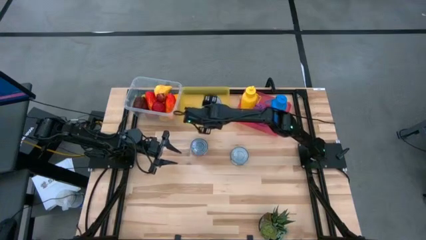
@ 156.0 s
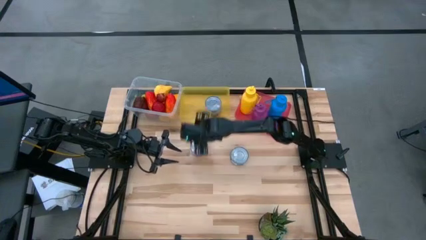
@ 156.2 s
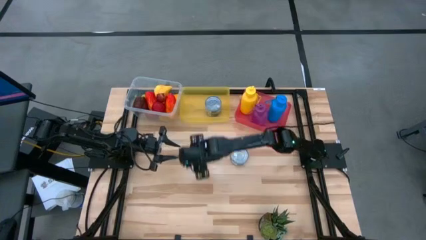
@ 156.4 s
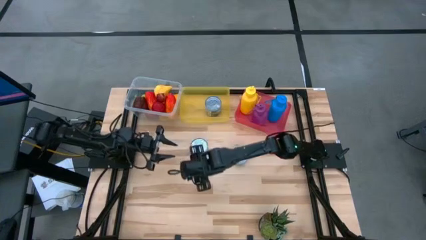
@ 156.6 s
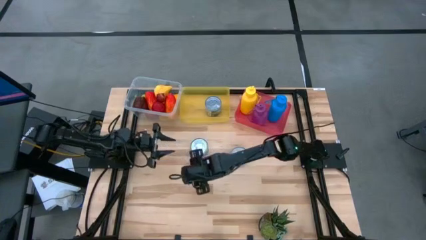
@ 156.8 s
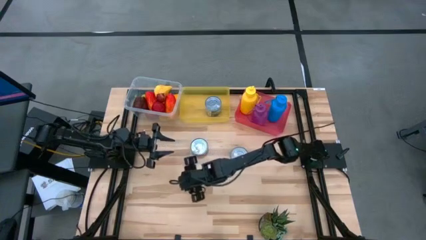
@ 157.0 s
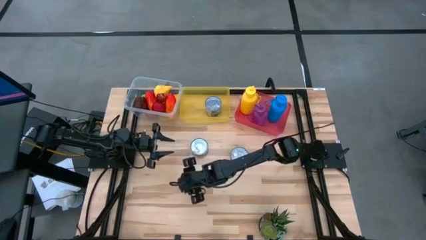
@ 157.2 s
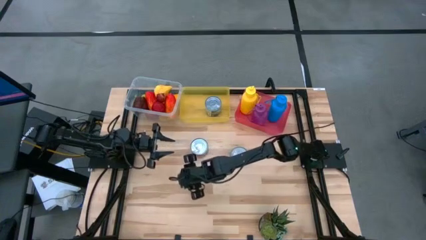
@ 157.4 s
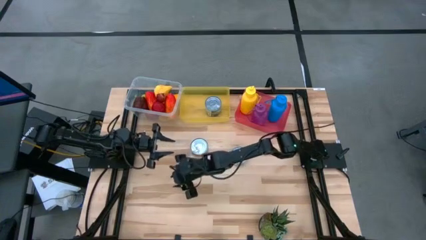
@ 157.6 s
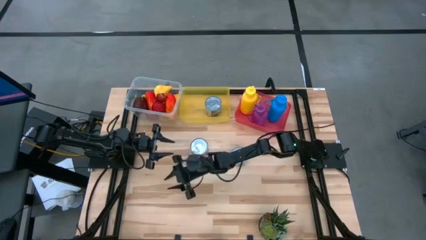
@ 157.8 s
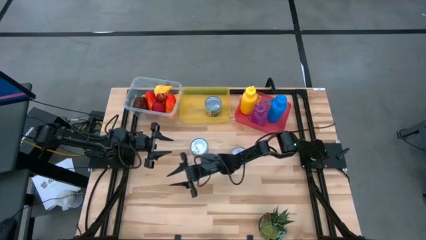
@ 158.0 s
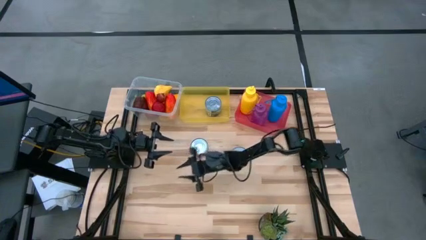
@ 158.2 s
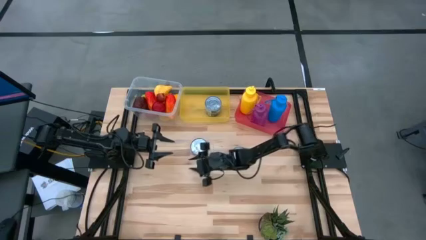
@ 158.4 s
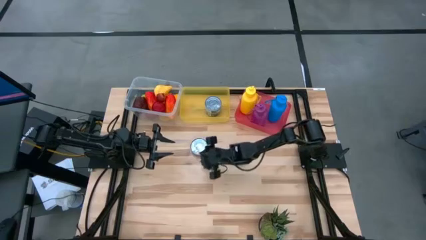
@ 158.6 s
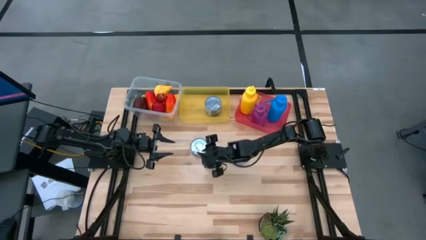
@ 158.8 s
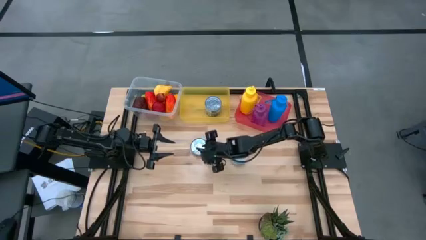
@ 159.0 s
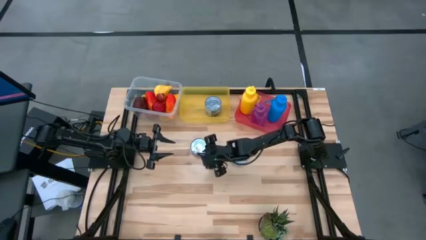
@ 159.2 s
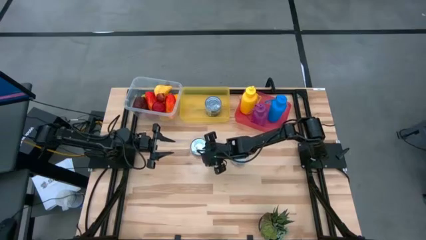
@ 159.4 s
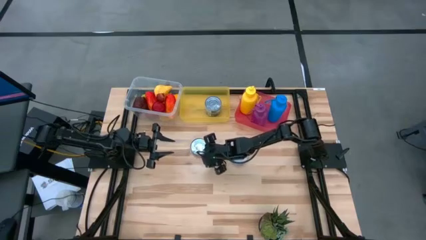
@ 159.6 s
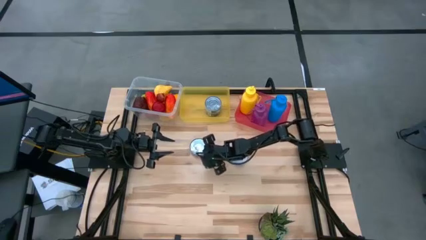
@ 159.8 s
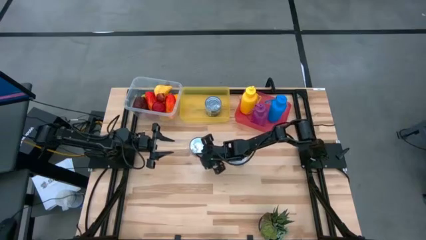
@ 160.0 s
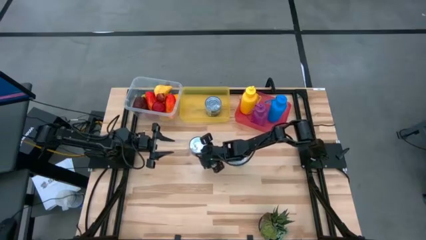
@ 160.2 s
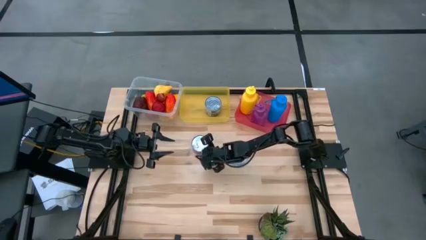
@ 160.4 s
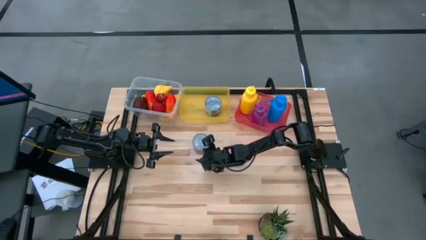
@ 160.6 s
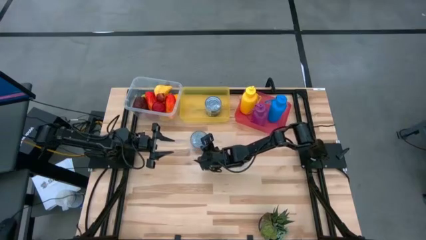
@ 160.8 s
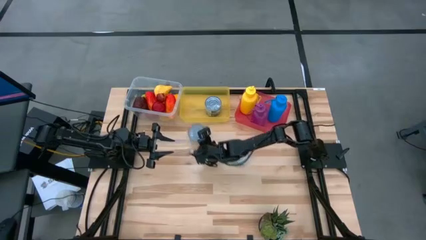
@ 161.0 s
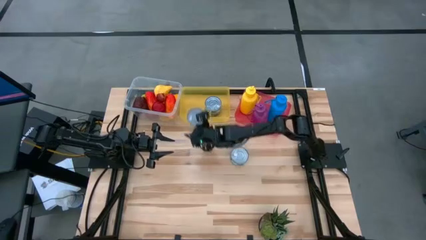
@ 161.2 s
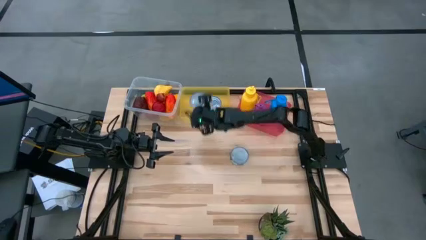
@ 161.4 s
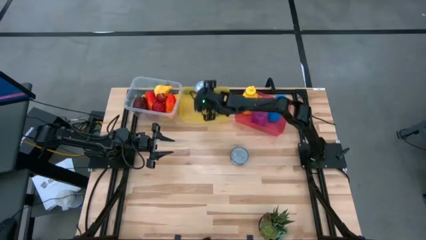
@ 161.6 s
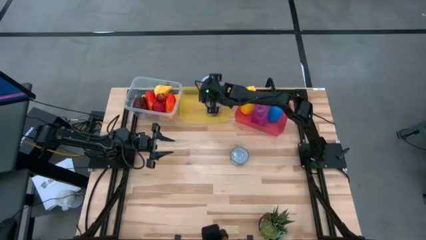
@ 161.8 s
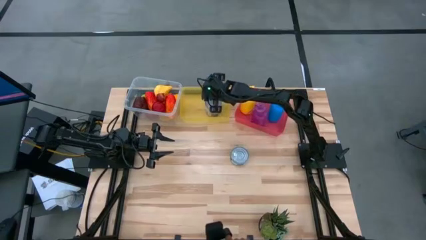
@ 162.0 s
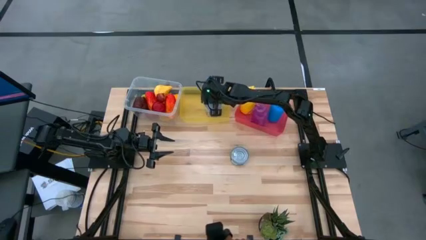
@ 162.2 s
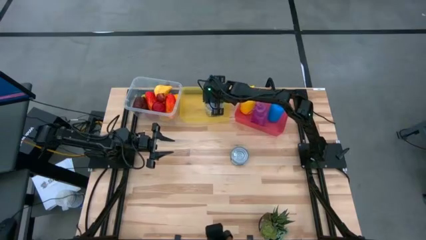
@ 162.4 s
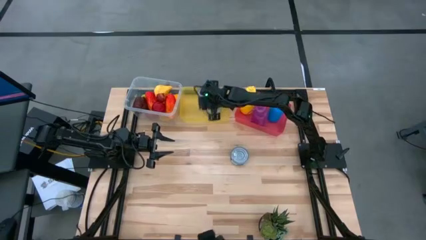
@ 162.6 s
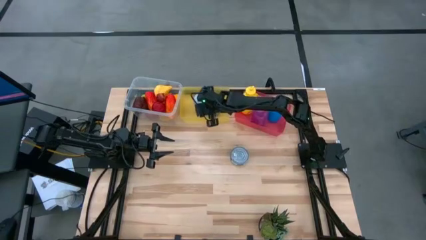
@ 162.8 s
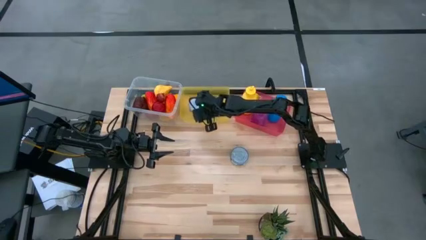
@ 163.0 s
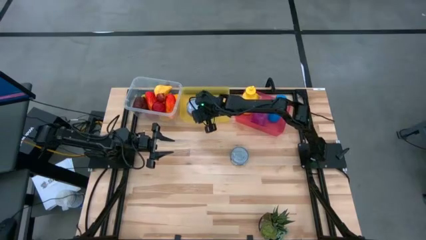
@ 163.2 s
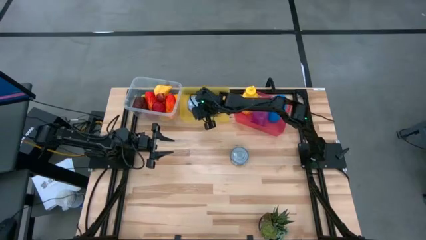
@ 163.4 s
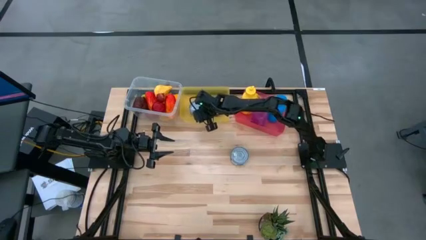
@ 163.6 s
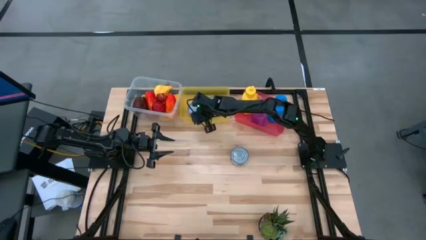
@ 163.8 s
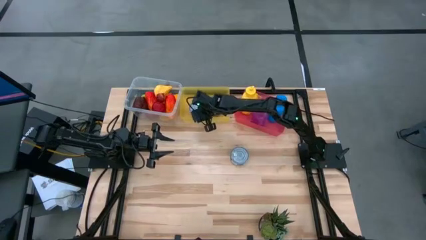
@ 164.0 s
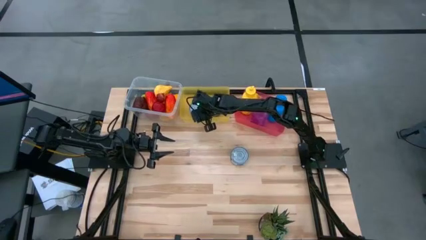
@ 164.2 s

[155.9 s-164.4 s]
Task: Pick & Place Food Item
Put the red tuna can into the yellow bin

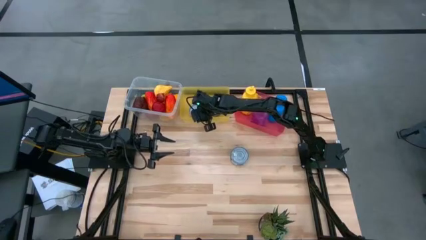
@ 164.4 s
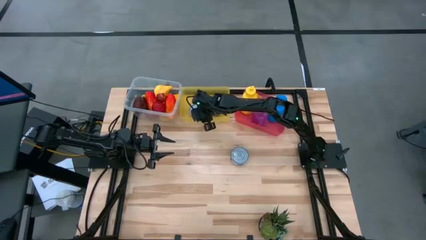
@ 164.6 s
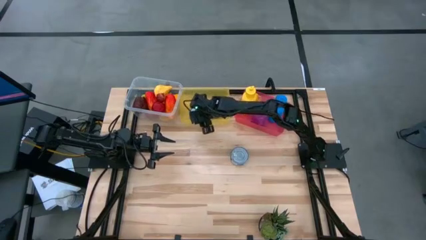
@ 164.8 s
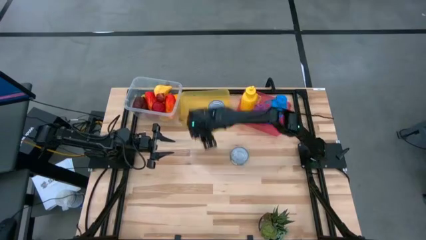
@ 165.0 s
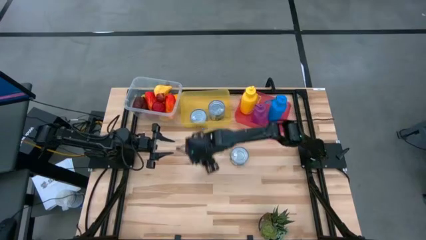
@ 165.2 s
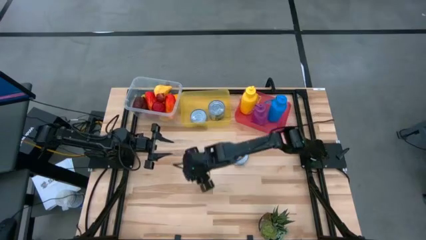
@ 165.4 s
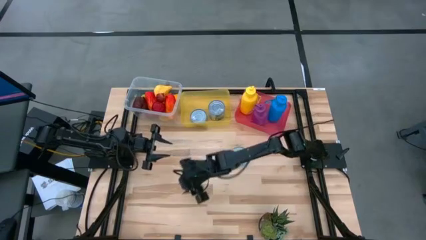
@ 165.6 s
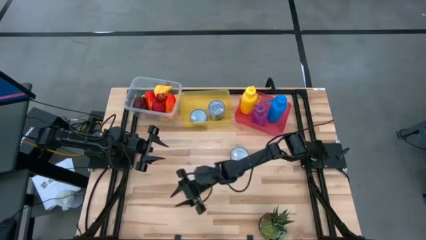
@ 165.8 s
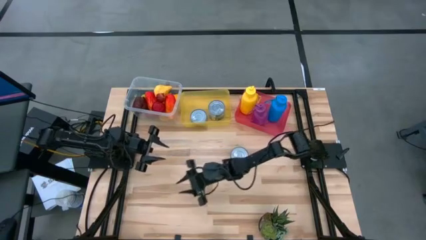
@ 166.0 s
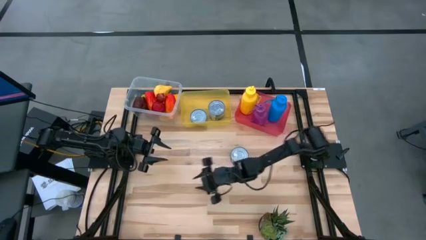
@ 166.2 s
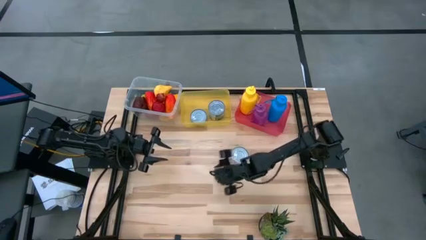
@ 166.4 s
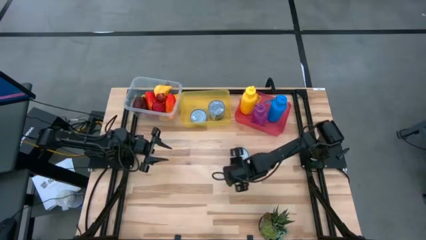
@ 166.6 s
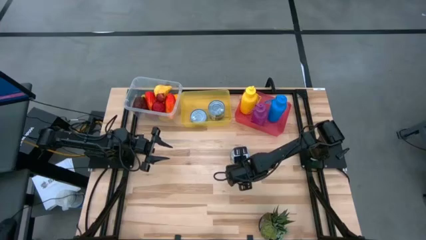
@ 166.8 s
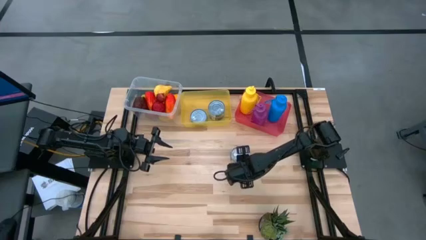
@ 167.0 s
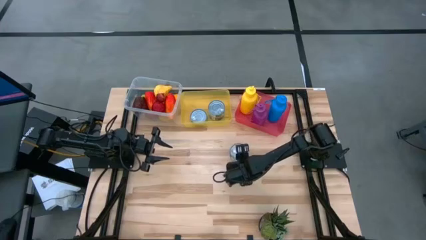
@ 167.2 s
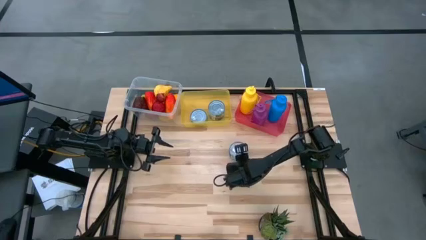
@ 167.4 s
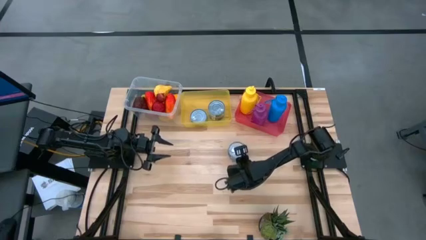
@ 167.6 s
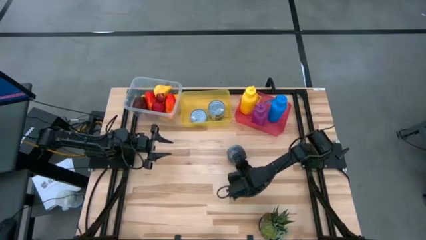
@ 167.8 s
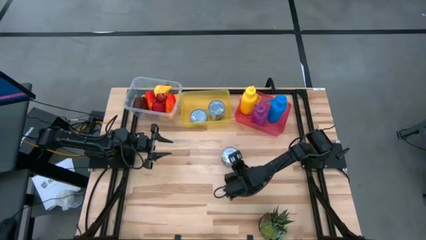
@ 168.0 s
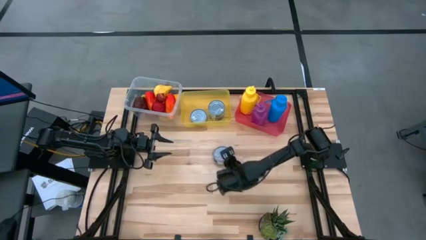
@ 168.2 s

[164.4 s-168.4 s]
Put the blue tuna can into the yellow bin

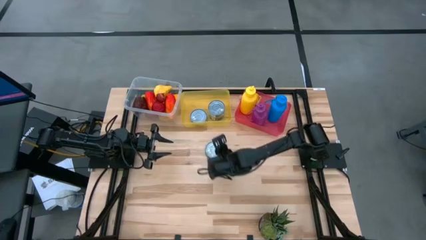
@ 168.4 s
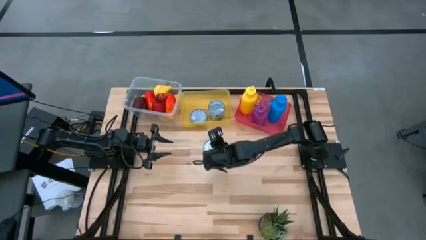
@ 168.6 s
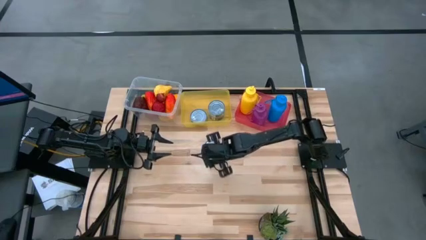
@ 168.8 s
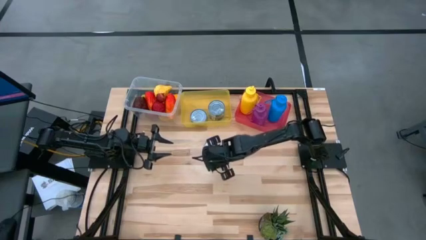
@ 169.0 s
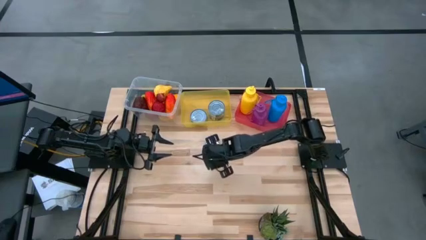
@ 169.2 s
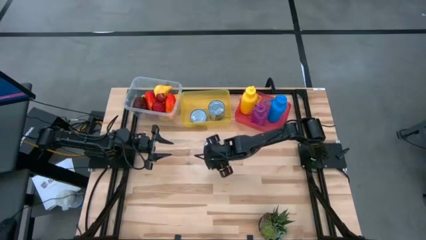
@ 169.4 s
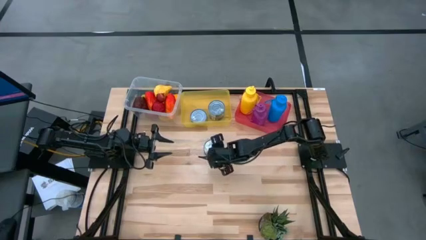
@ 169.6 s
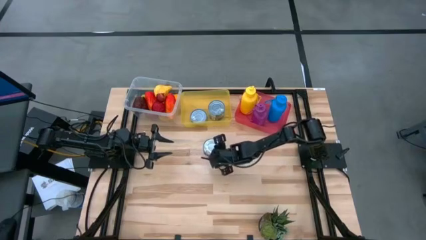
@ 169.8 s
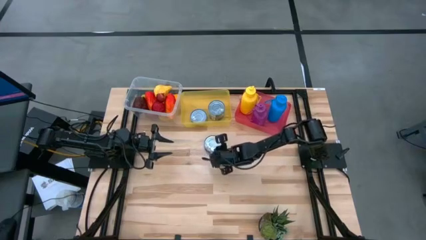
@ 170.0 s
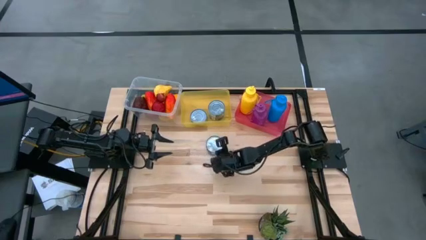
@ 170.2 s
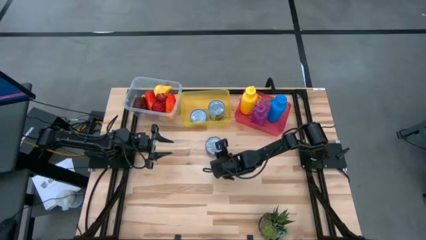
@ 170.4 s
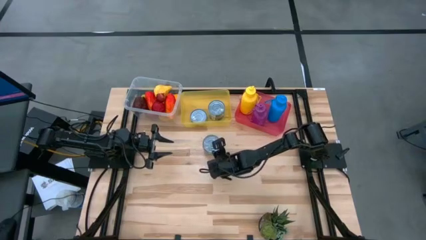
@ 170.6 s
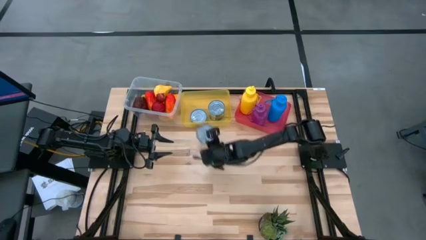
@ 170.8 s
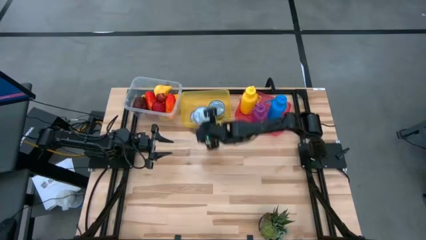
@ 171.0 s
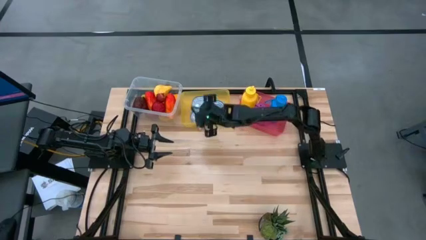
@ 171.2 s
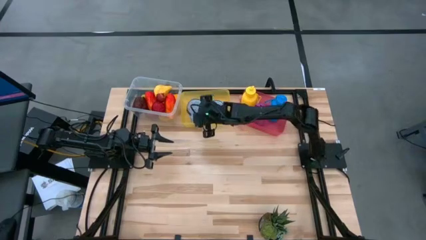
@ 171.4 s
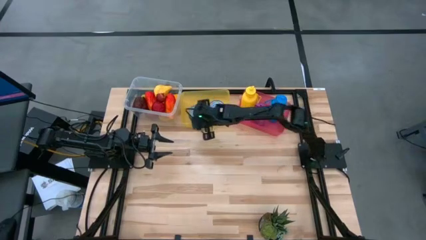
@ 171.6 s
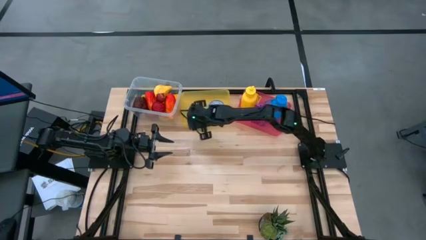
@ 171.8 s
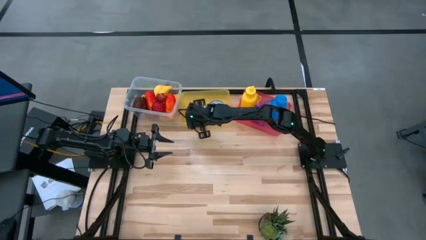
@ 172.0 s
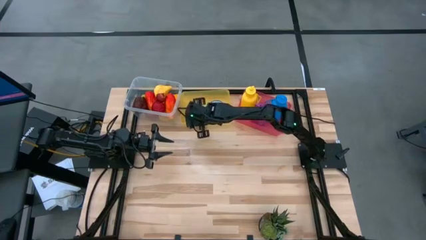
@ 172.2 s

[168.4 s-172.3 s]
Put the blue tuna can into the yellow bin
